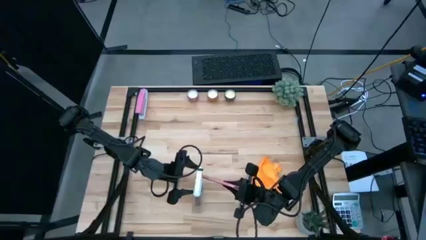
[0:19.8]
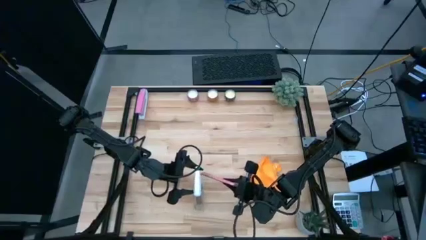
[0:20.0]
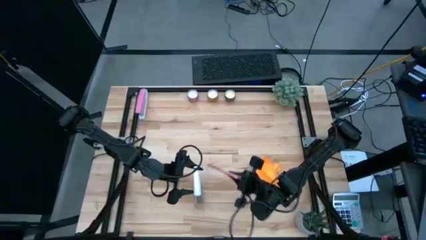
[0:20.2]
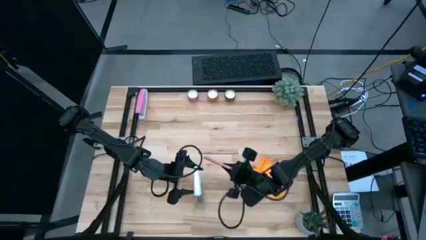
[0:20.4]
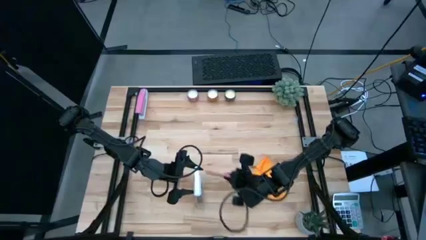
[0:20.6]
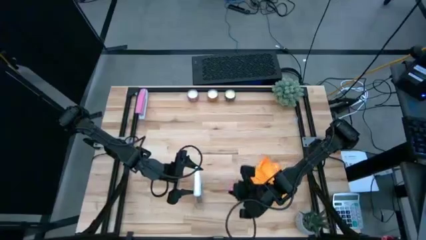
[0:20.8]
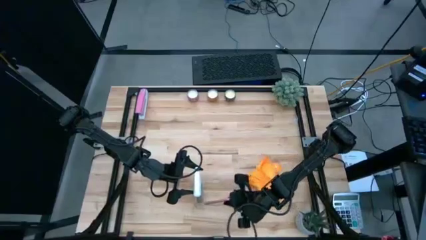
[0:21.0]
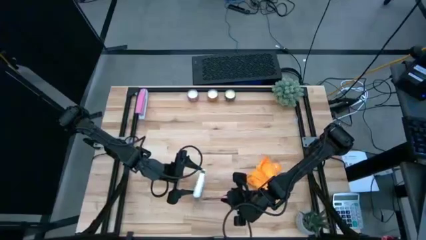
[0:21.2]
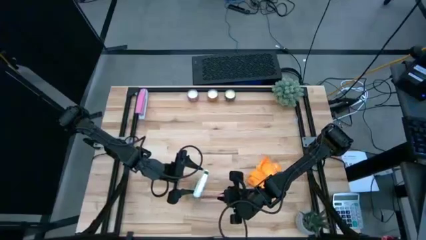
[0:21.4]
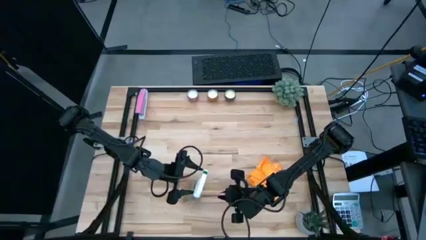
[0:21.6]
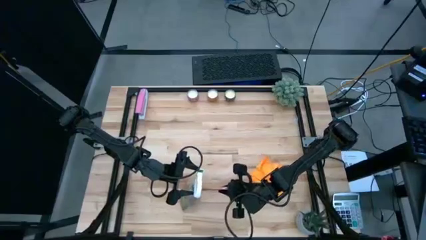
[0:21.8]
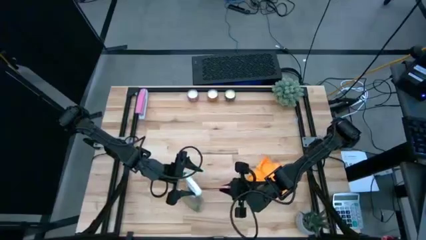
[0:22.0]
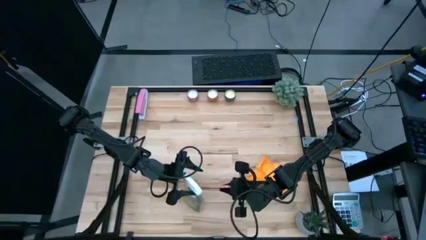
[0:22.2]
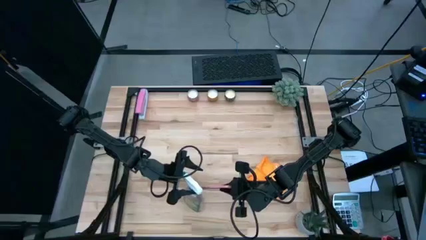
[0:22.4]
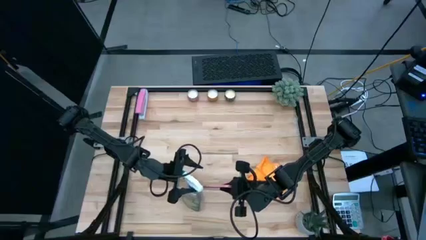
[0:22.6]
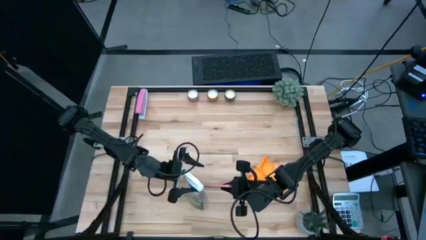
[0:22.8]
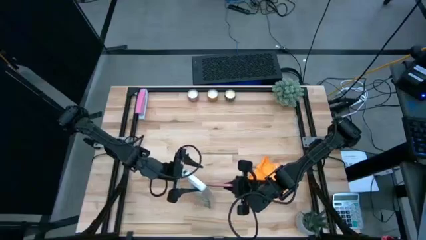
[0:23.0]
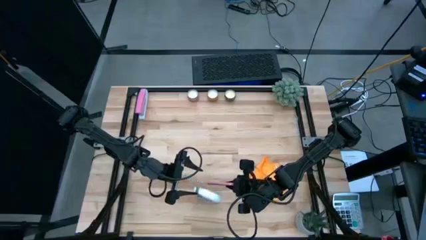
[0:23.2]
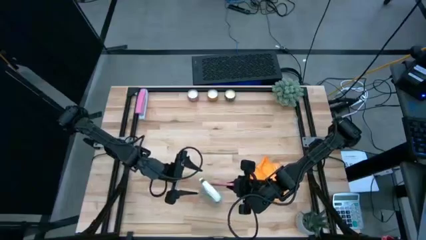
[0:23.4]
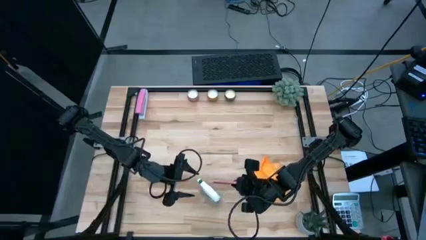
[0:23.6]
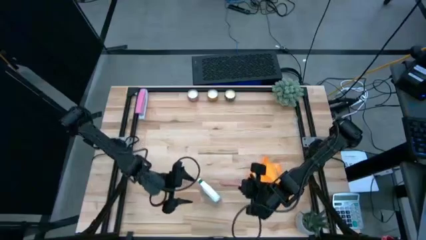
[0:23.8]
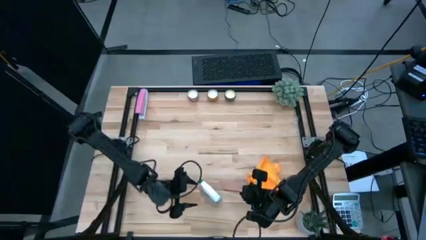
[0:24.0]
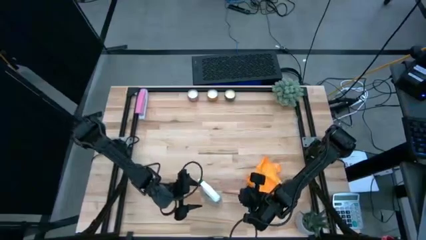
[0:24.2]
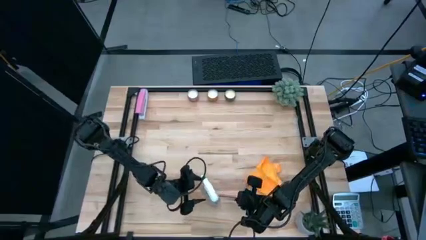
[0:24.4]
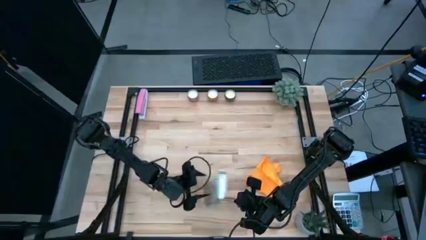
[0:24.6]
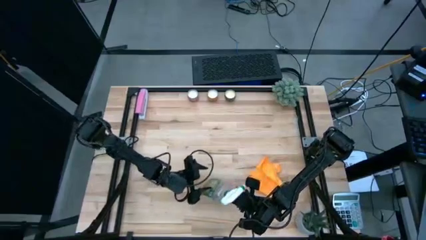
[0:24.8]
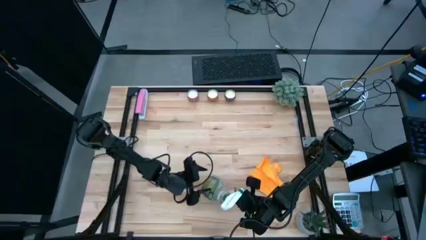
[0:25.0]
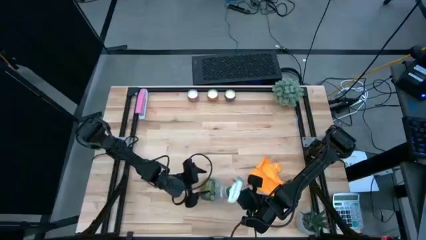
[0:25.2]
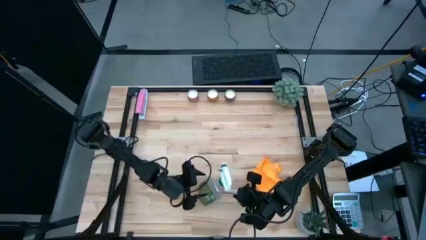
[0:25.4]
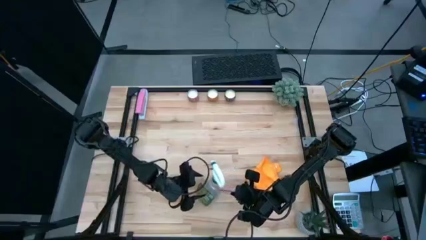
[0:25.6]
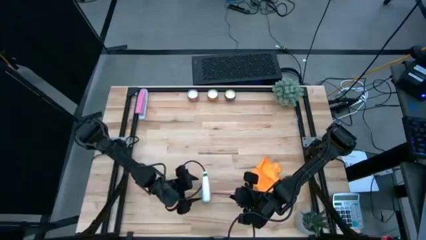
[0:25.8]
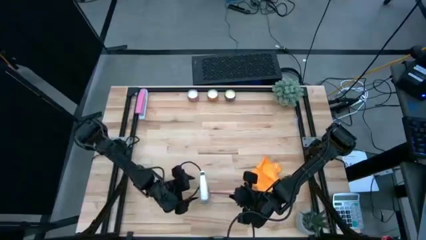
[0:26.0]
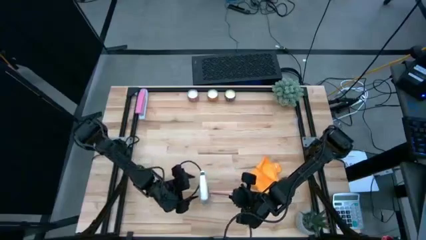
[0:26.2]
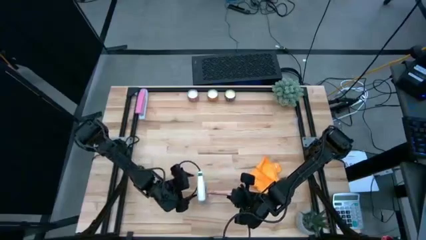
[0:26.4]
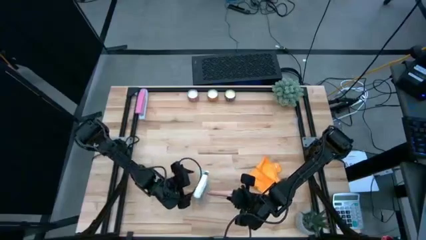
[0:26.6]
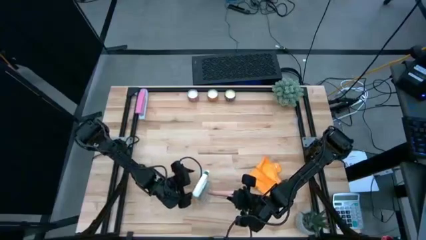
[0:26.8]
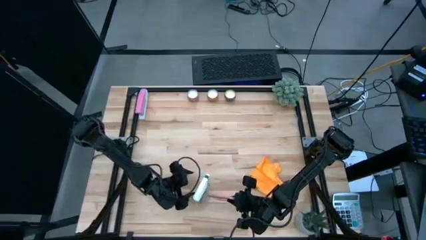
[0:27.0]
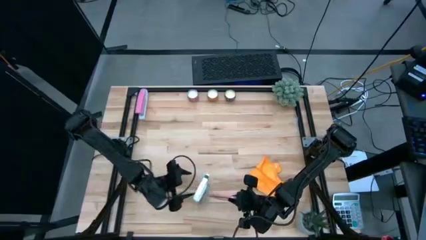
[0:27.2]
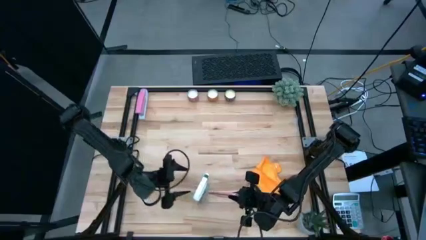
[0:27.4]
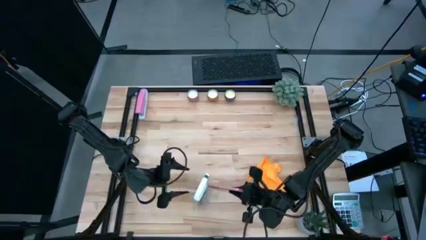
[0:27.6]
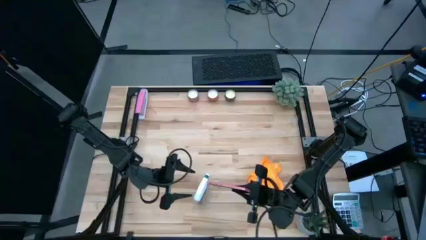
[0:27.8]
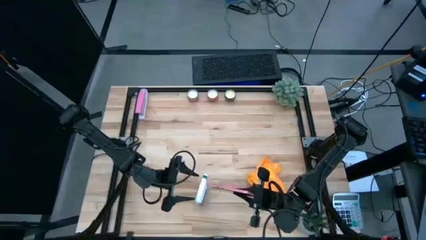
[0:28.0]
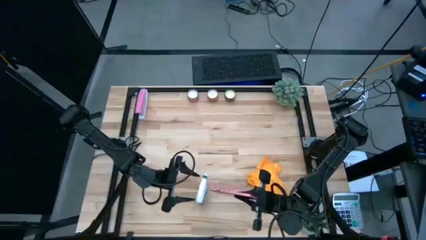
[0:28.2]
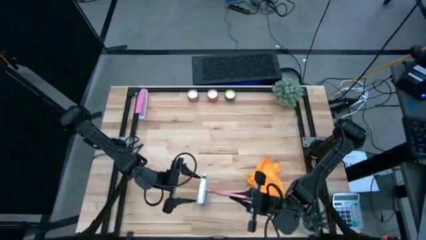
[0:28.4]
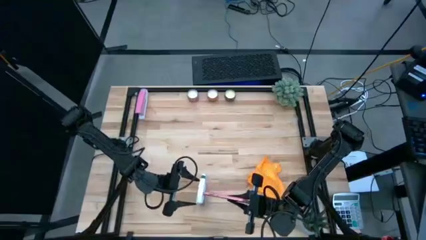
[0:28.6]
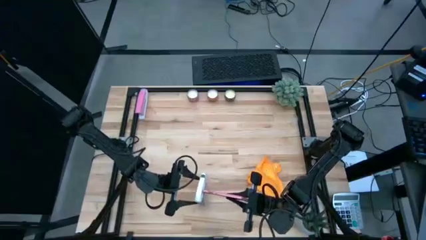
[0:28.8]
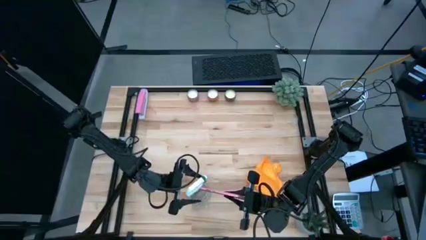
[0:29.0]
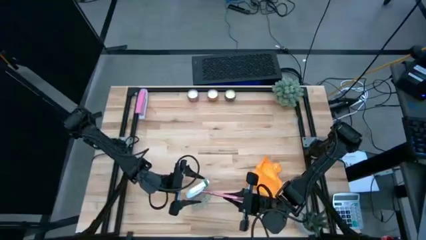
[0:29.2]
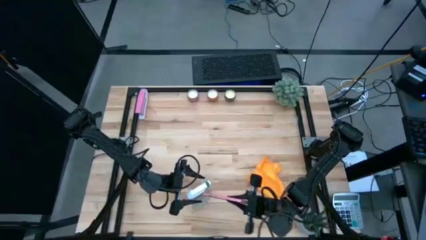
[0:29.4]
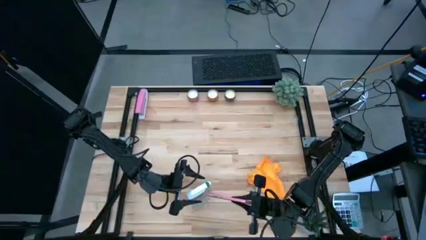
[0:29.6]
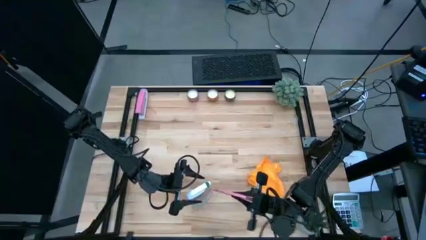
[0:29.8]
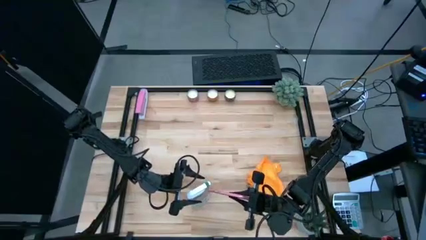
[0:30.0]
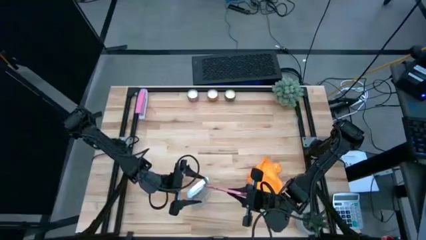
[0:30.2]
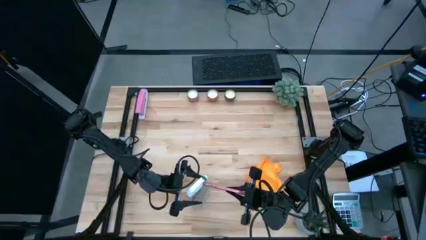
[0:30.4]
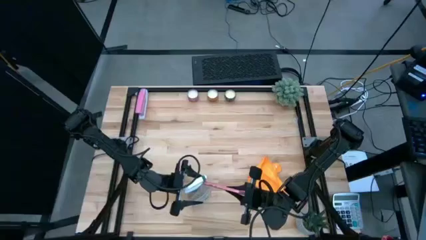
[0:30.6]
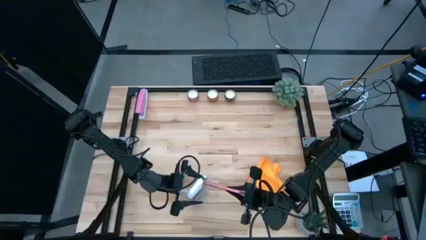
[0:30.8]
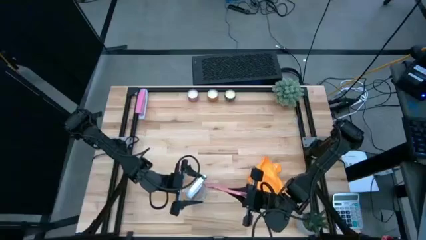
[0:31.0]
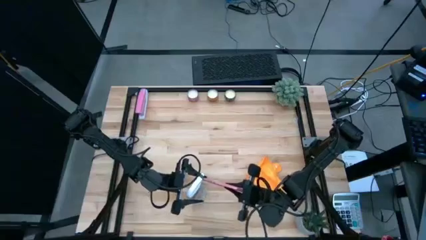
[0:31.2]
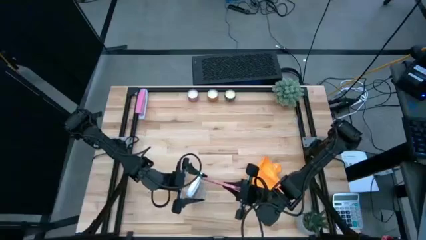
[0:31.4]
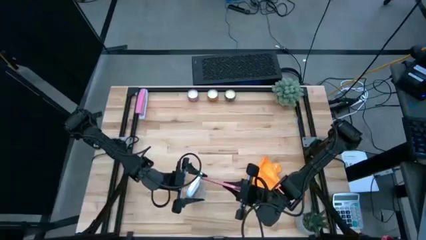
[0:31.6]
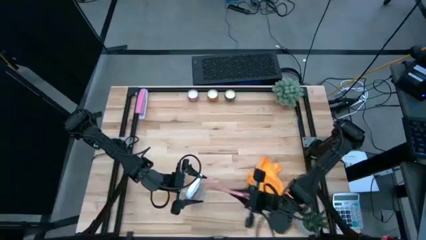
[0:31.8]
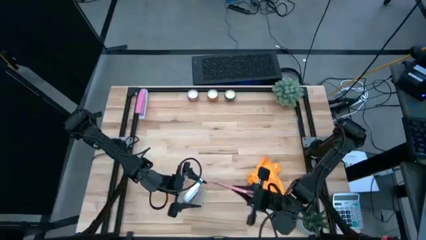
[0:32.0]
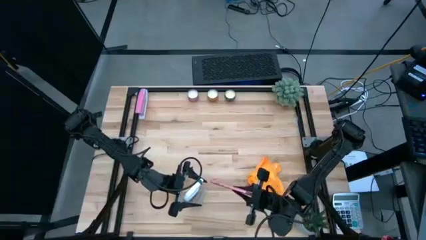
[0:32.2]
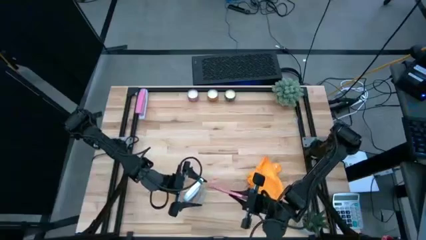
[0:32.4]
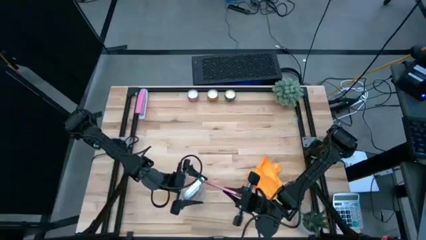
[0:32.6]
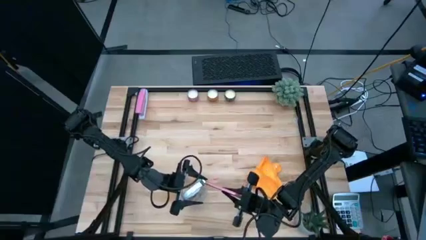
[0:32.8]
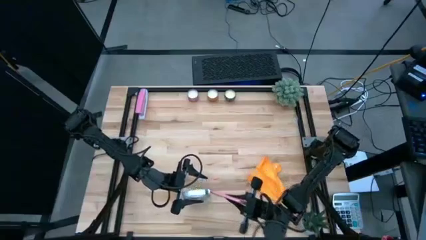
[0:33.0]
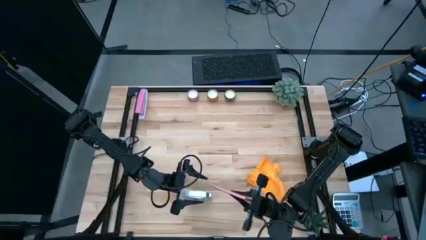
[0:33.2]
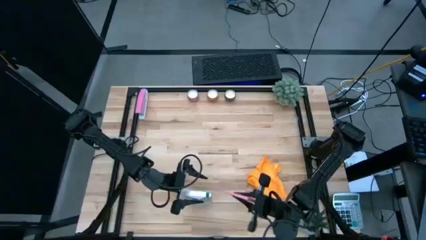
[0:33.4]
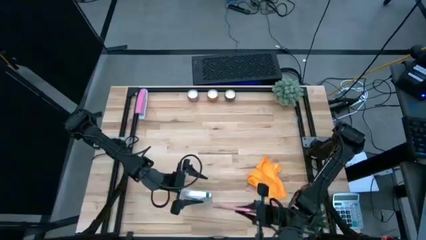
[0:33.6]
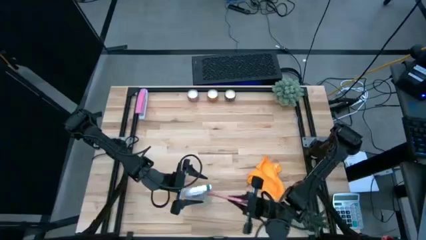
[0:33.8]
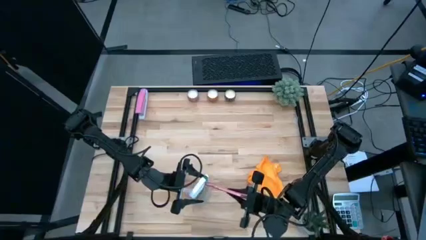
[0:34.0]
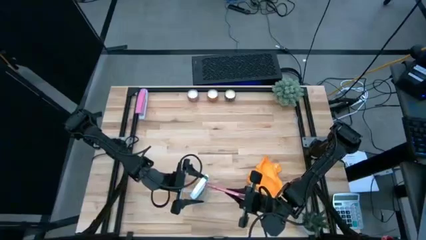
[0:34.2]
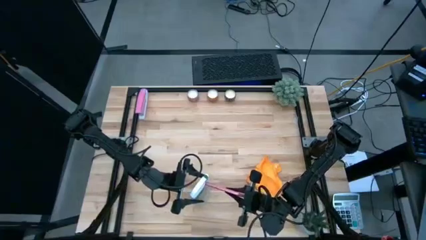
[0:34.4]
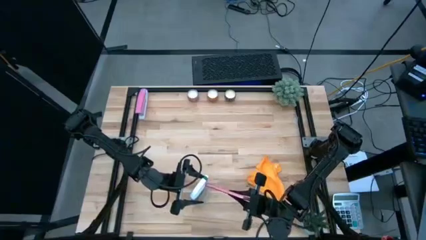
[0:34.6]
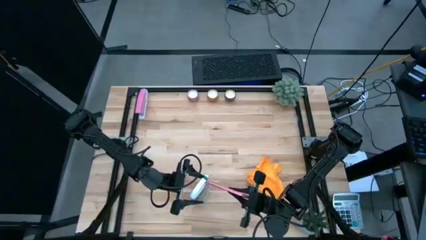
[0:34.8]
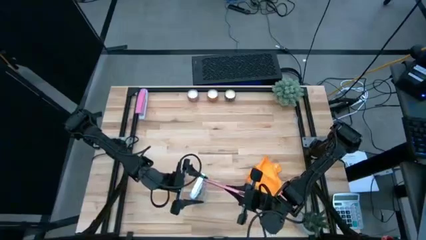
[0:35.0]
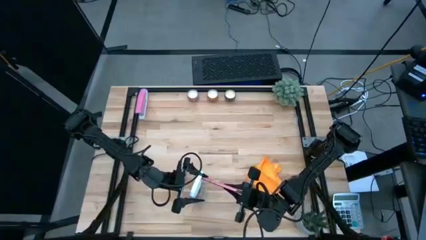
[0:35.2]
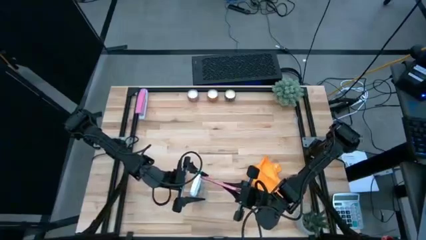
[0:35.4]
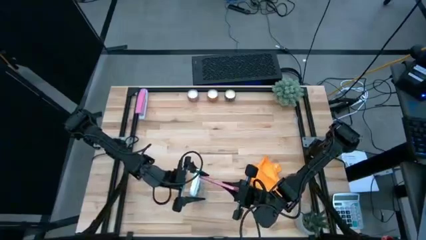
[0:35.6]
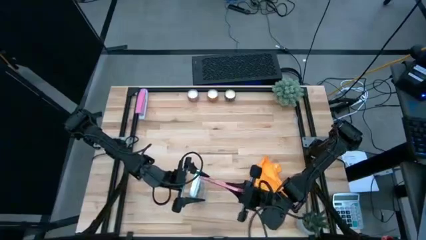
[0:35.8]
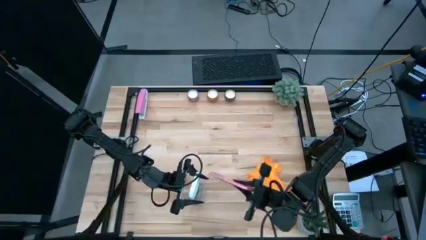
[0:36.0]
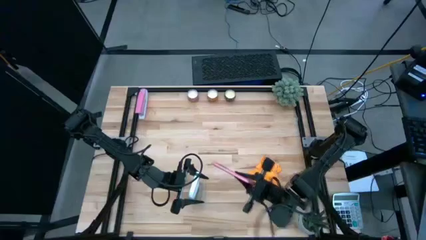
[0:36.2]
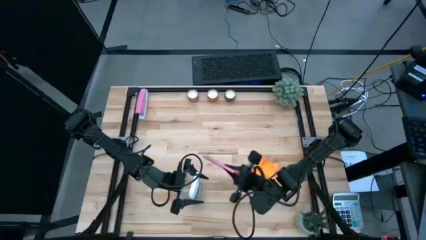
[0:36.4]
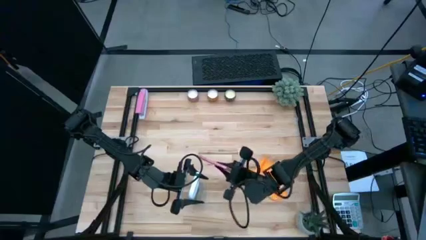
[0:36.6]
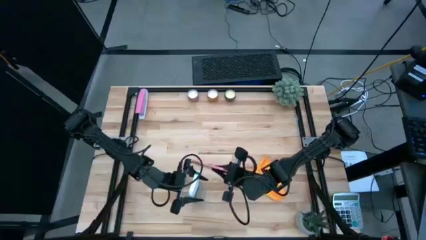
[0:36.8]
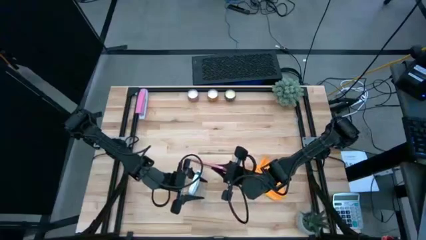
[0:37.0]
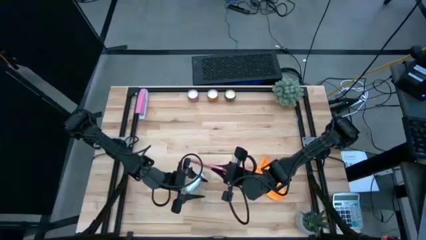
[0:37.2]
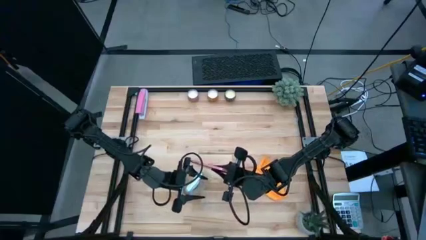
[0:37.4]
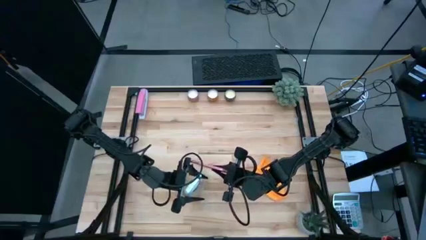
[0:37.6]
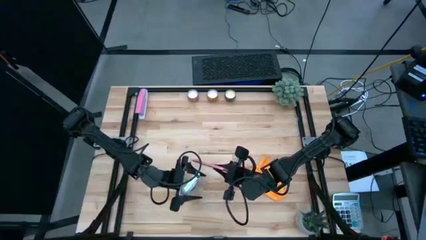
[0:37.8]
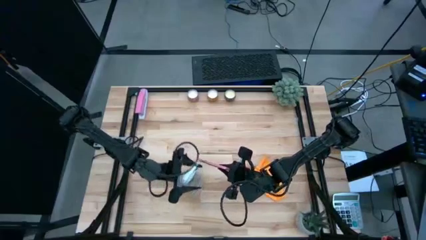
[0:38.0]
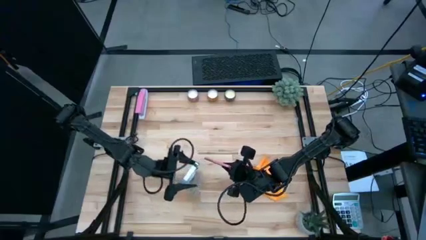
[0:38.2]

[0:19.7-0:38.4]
Task: Apply microfiber cloth
Spray the front of the cellphone with a spray bottle
